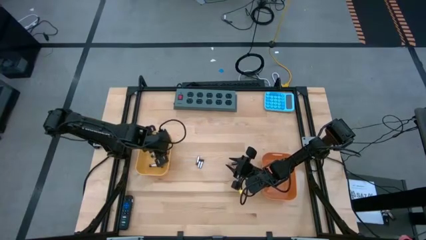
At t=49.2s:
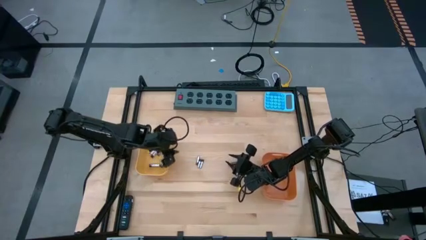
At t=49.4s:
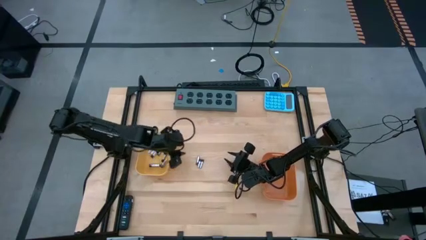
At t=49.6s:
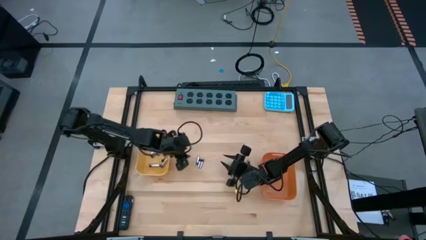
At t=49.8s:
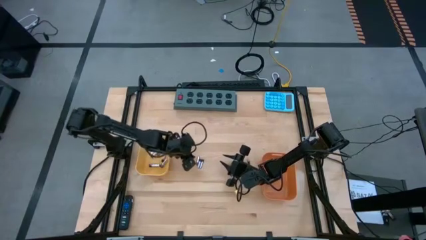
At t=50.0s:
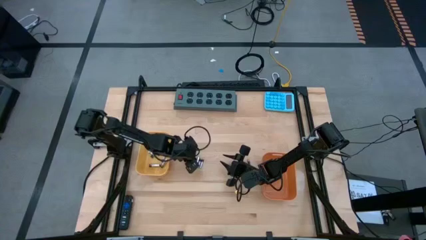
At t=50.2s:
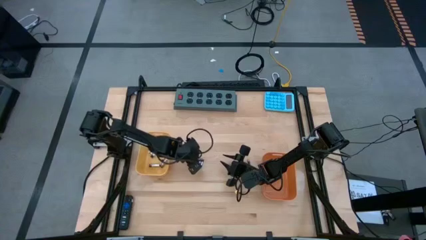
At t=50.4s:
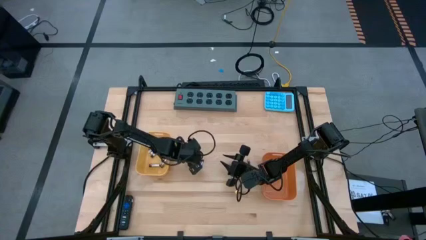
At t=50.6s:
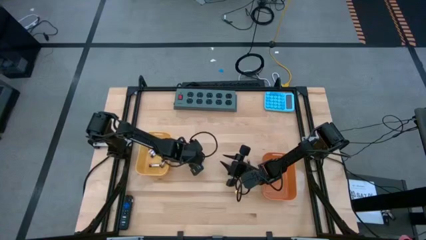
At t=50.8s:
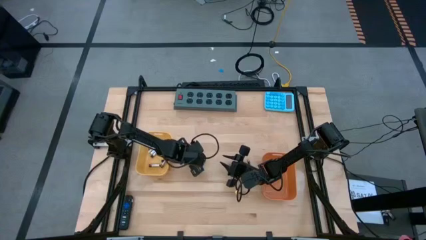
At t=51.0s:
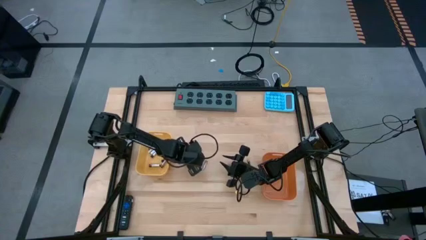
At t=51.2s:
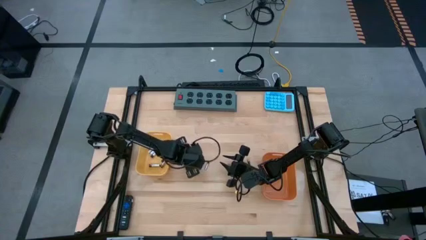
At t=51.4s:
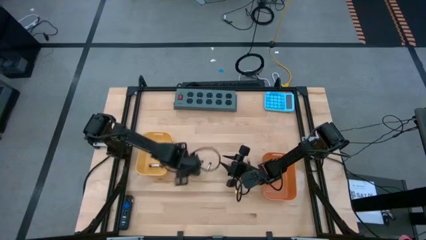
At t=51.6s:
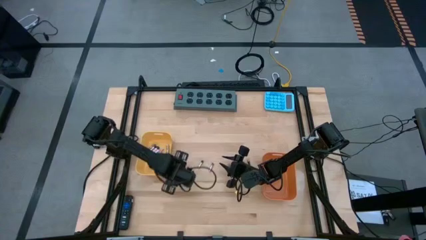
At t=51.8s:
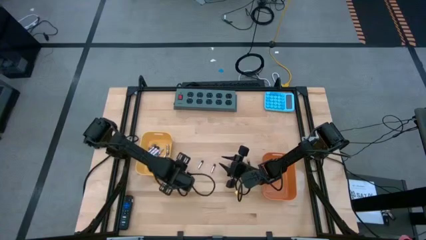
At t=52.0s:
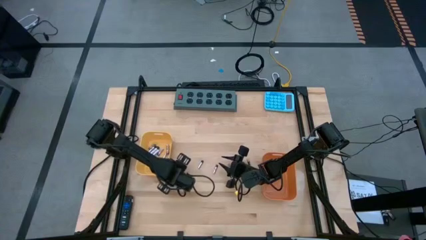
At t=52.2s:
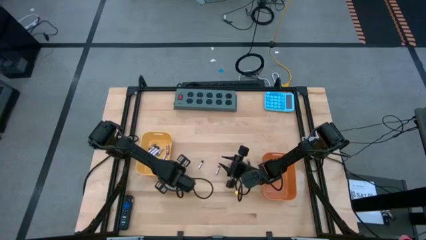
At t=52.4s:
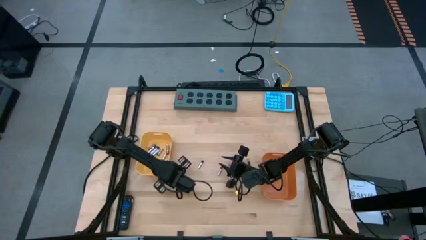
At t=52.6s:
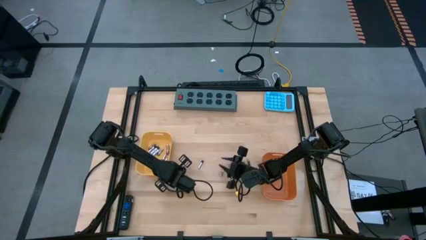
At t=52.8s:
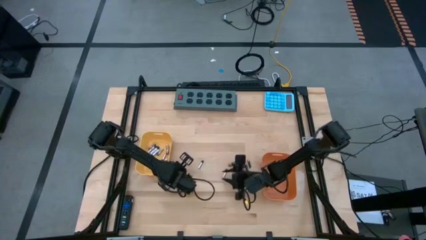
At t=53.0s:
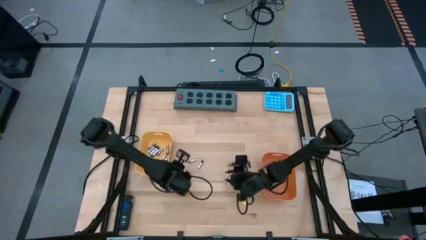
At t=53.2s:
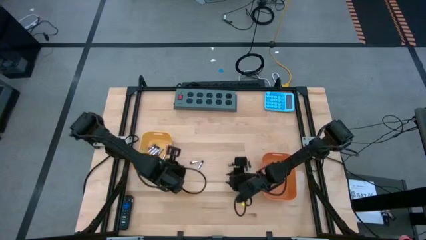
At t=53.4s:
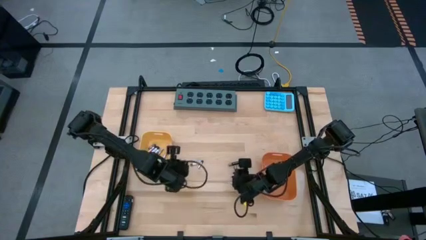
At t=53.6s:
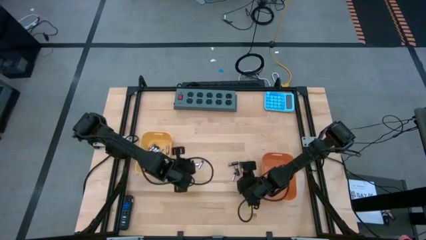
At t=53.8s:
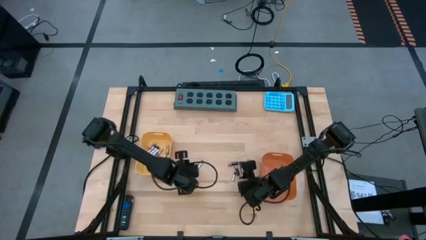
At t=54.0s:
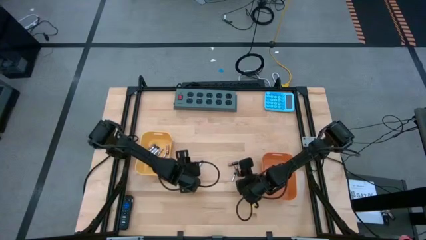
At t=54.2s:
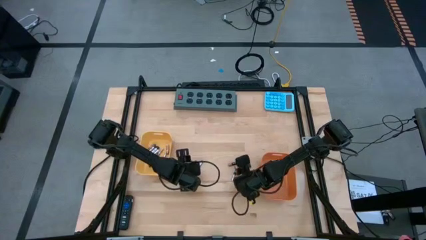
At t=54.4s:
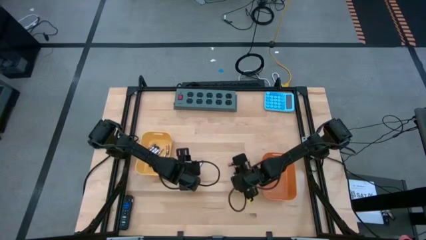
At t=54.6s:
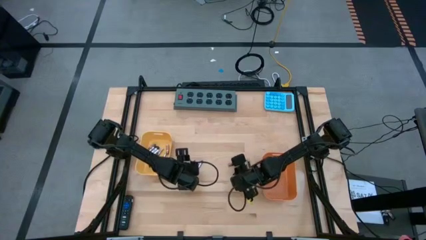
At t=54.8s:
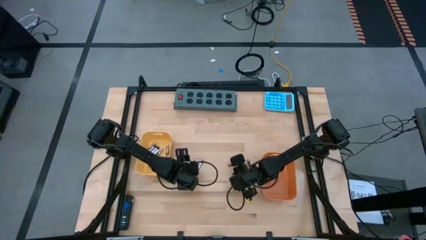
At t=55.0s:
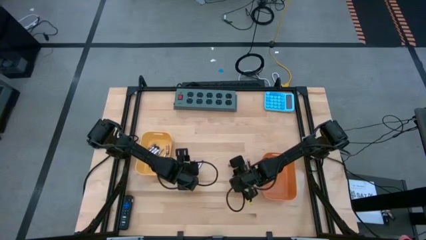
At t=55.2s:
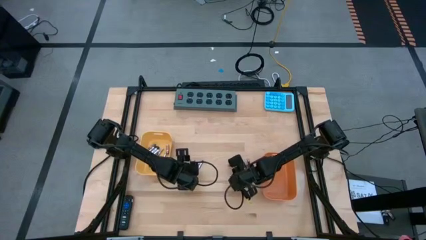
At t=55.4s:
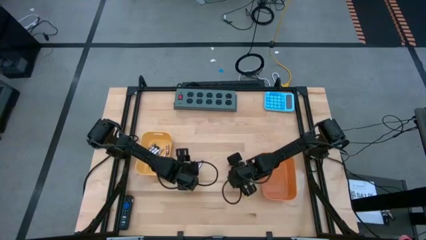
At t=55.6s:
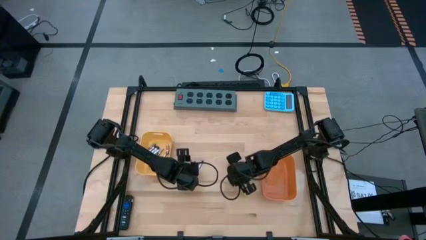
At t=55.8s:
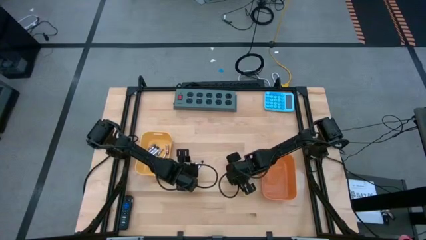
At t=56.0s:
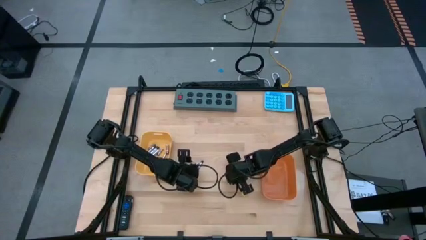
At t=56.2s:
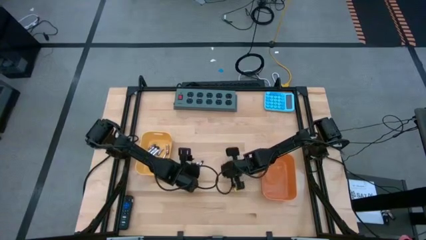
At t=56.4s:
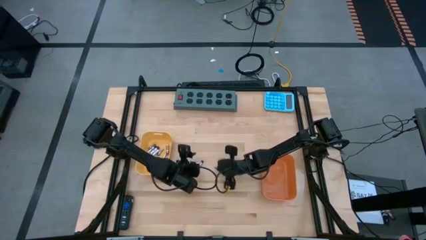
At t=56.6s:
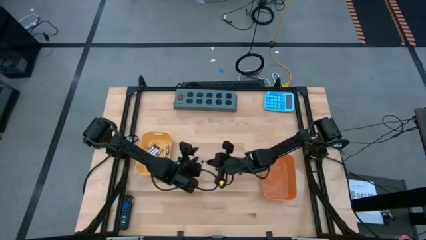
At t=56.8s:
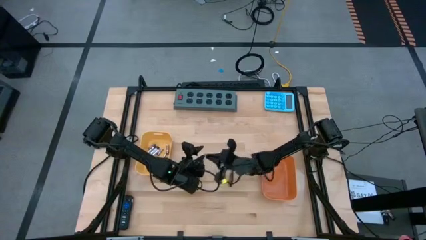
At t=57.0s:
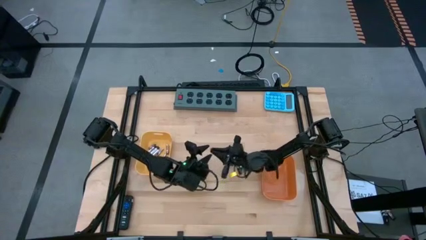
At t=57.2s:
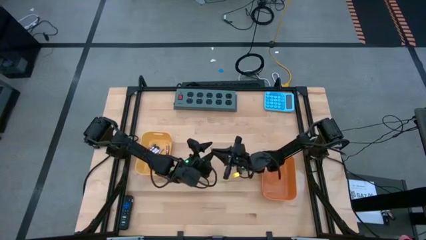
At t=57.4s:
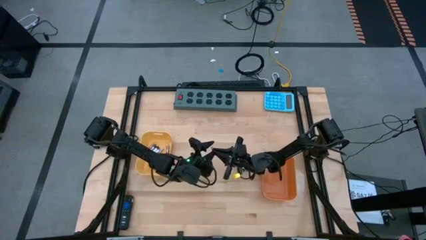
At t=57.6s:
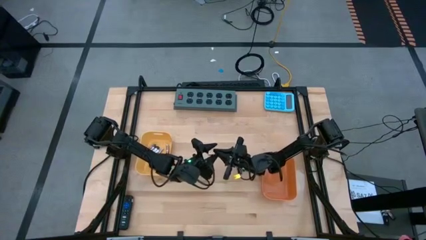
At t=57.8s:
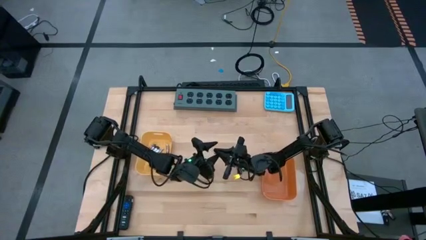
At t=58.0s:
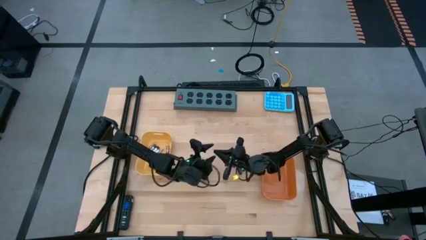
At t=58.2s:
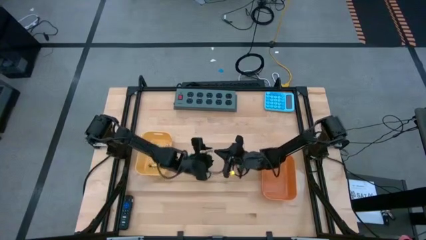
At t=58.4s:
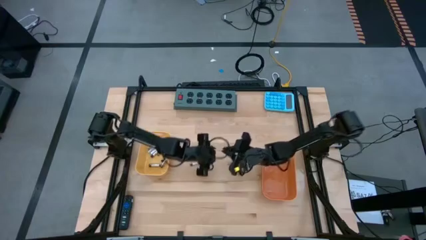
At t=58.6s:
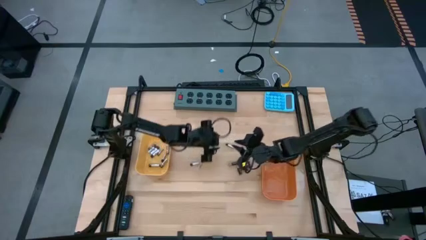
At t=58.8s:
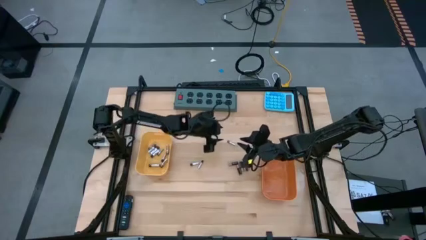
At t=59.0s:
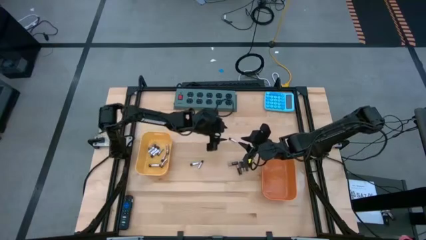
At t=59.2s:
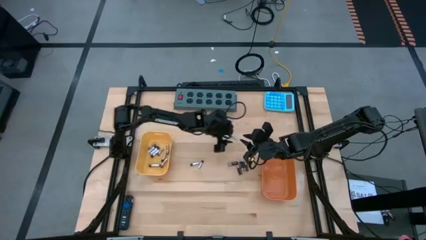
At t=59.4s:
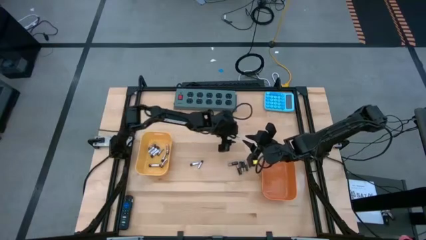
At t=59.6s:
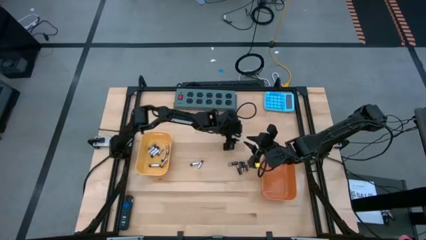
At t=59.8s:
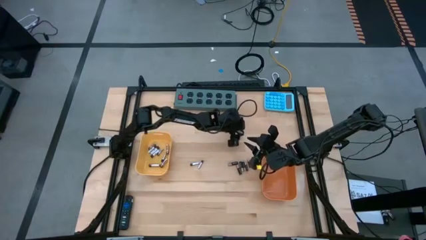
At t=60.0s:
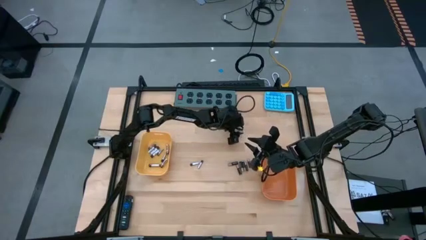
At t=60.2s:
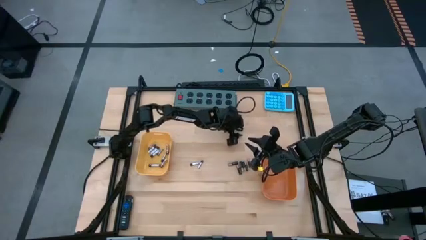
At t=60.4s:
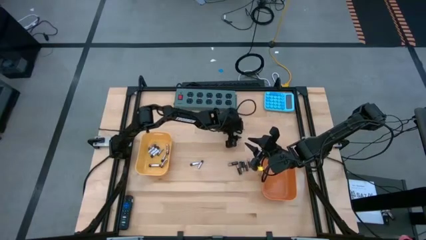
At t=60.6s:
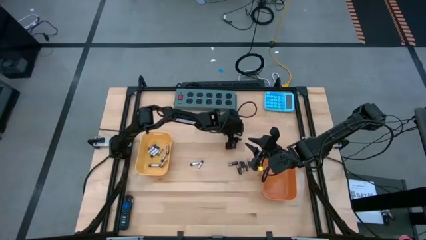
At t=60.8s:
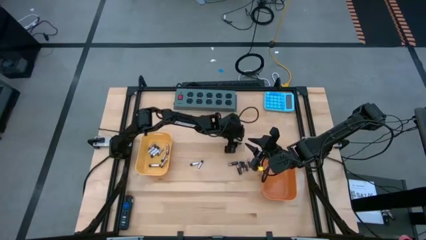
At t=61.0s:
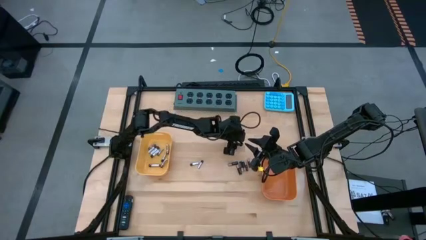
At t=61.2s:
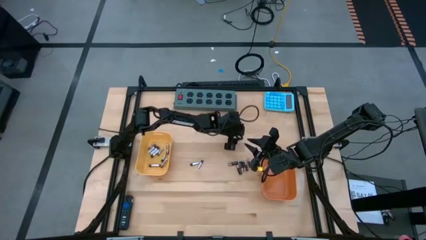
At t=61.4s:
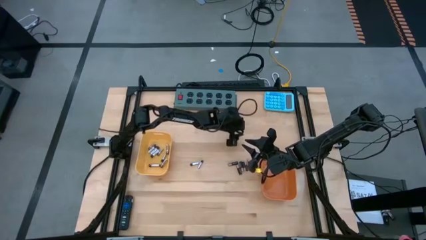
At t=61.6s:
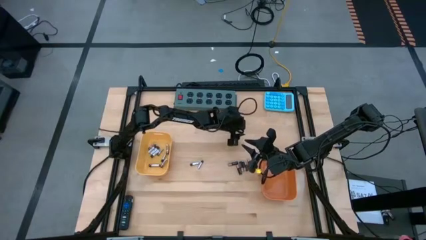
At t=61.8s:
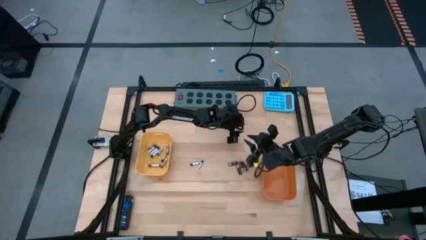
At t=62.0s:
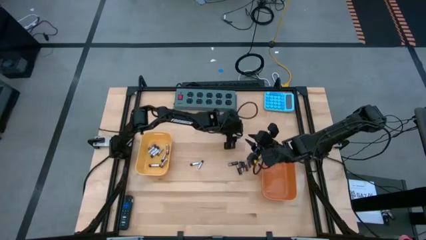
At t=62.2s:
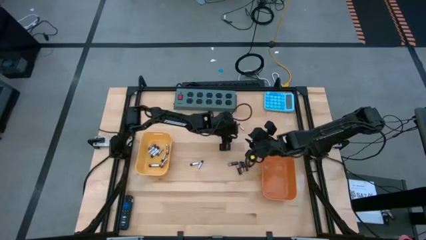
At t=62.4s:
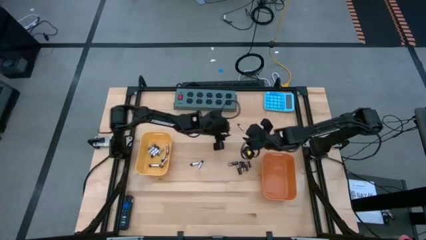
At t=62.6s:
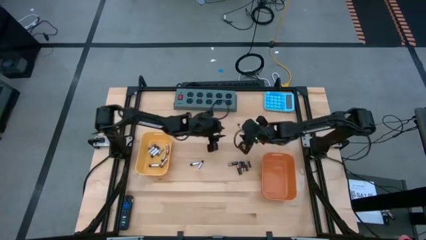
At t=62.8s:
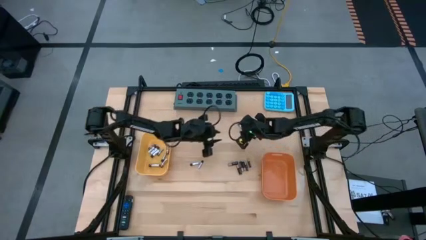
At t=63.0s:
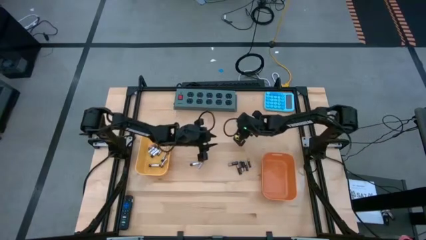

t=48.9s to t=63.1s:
Task: Sort batteries
Put the silver battery into the yellow bin

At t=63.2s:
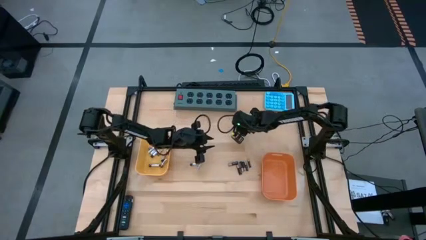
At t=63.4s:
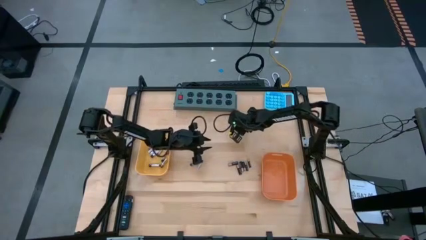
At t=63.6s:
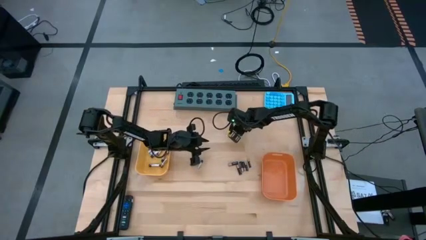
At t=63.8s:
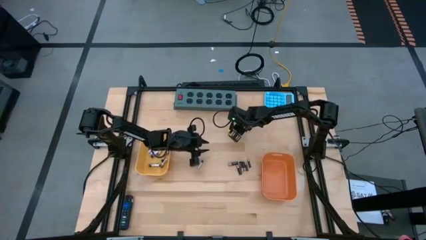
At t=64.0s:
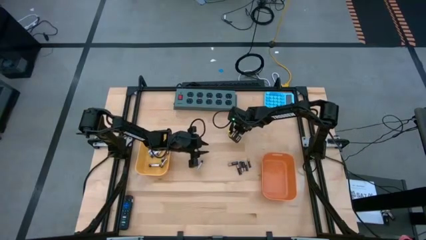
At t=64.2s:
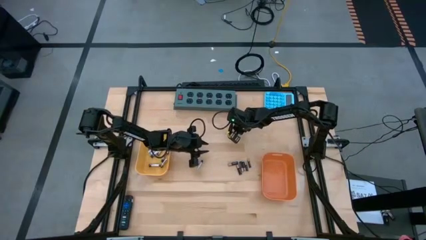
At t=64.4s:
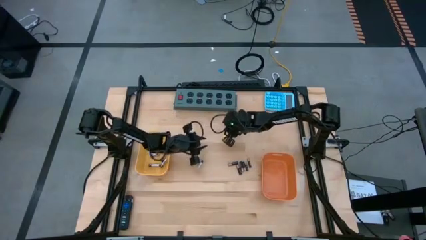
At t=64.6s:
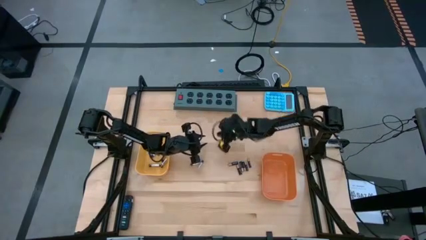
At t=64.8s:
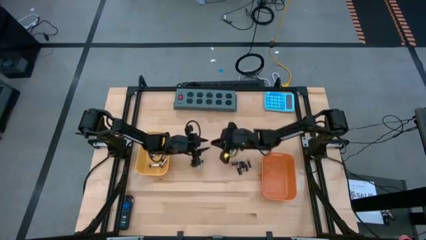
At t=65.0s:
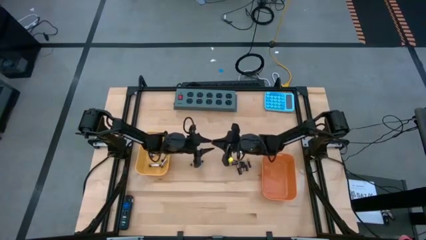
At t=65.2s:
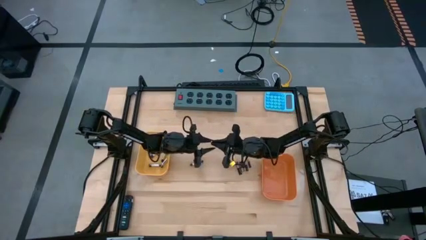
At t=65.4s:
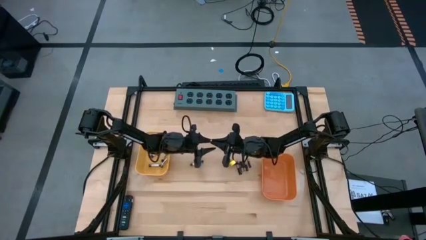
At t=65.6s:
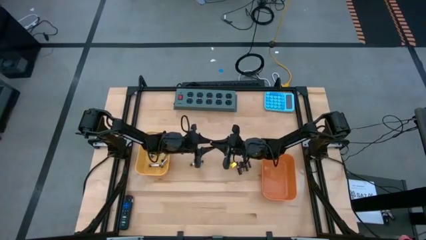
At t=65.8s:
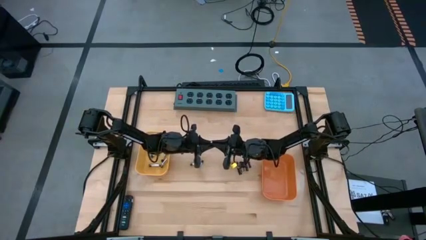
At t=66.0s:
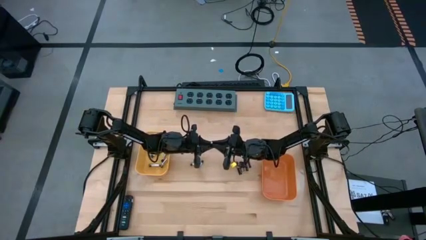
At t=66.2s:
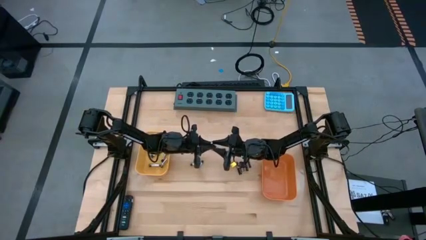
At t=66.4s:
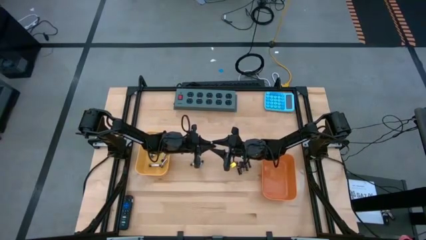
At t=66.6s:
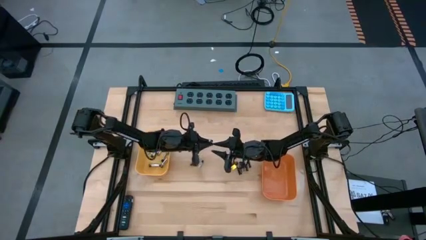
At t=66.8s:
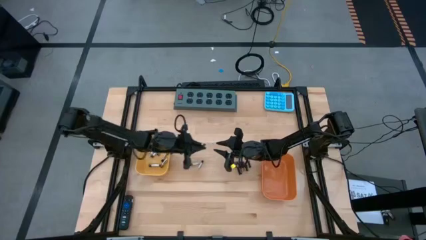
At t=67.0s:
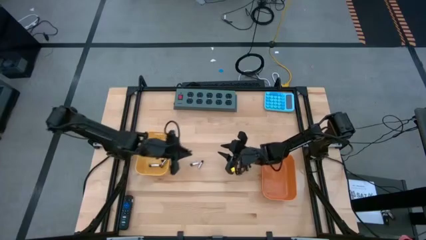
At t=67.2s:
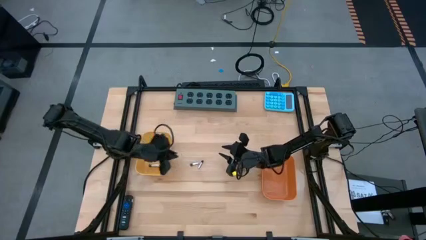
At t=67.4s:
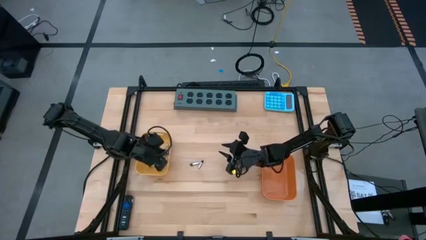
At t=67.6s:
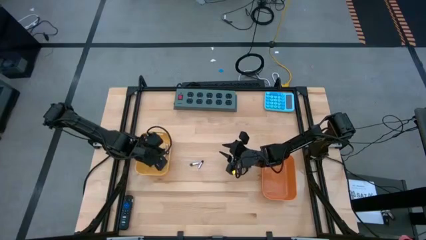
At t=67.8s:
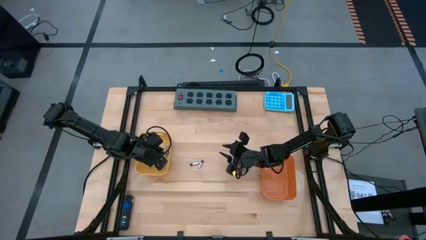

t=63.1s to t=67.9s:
Put the silver battery into the yellow bin
